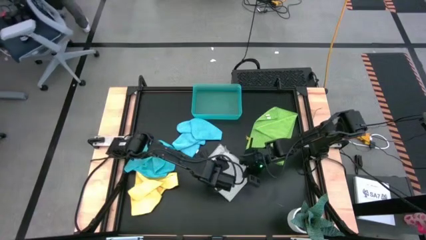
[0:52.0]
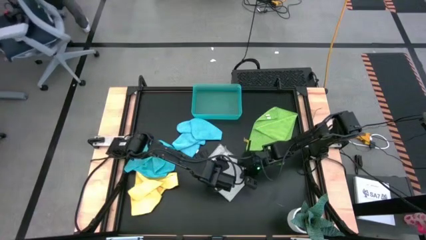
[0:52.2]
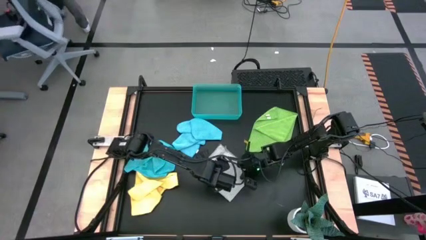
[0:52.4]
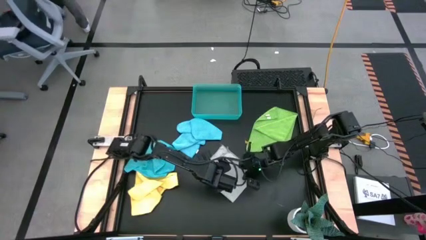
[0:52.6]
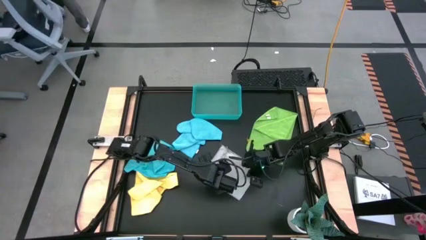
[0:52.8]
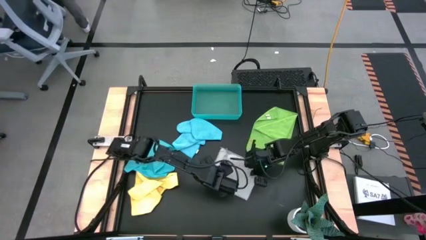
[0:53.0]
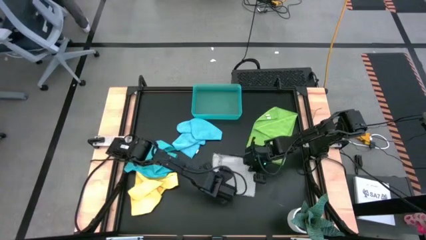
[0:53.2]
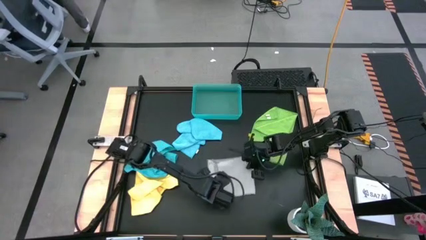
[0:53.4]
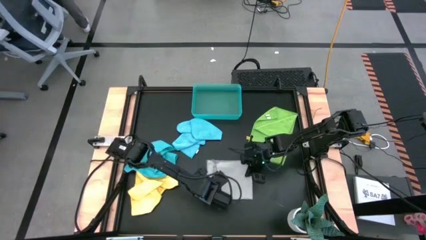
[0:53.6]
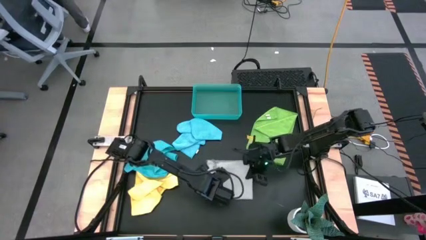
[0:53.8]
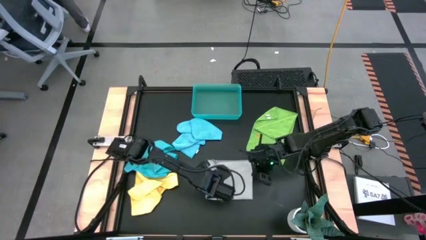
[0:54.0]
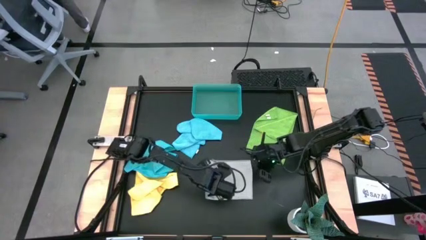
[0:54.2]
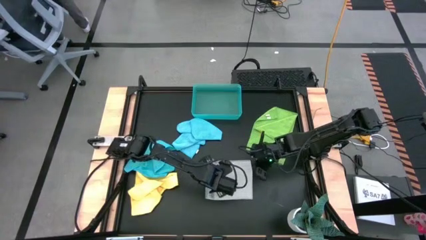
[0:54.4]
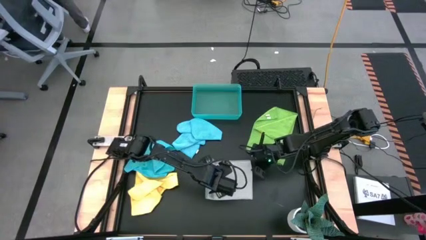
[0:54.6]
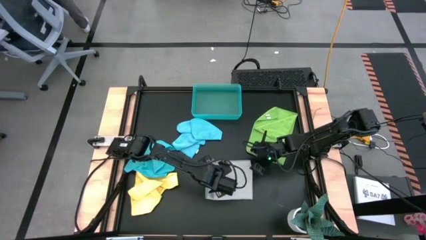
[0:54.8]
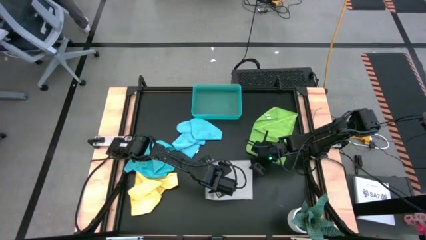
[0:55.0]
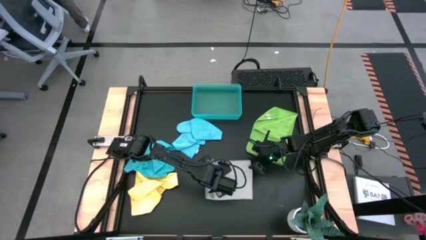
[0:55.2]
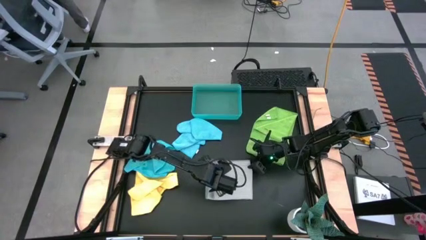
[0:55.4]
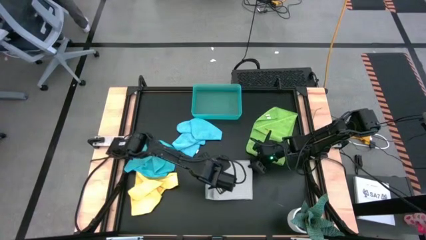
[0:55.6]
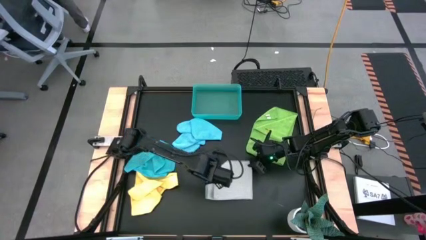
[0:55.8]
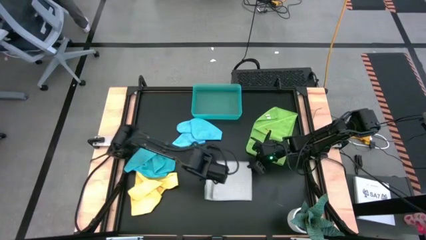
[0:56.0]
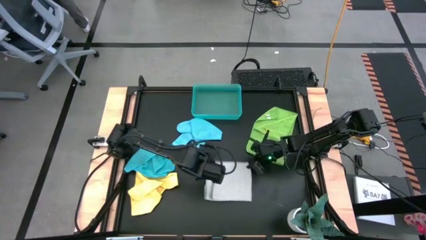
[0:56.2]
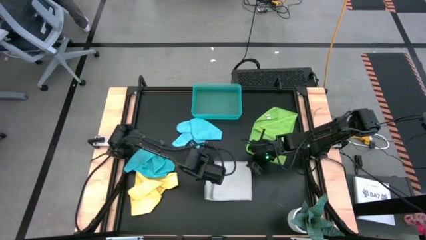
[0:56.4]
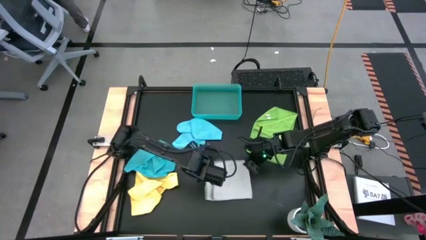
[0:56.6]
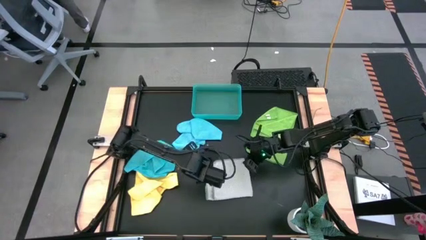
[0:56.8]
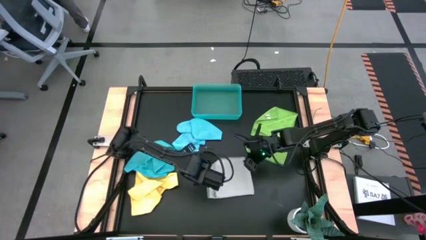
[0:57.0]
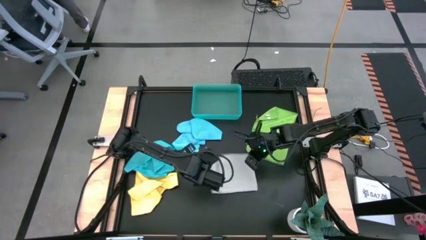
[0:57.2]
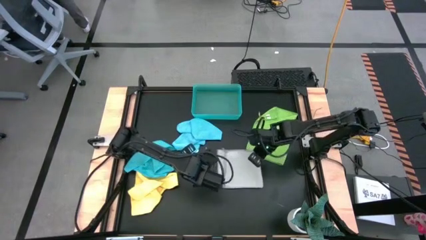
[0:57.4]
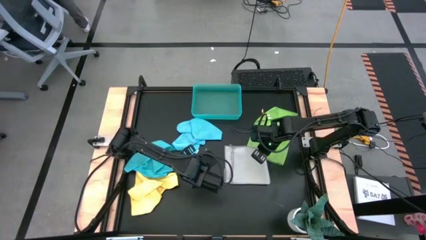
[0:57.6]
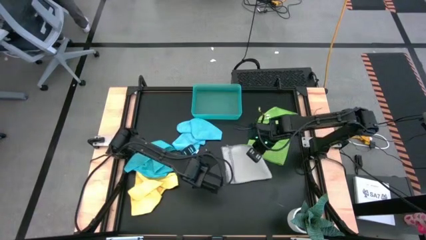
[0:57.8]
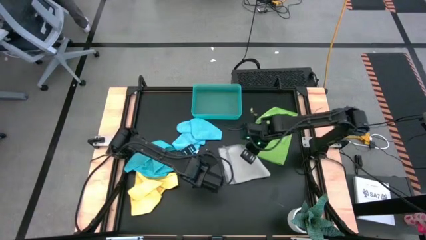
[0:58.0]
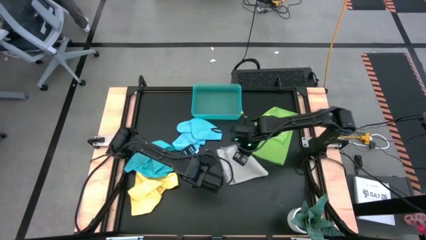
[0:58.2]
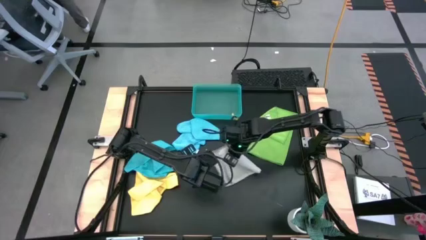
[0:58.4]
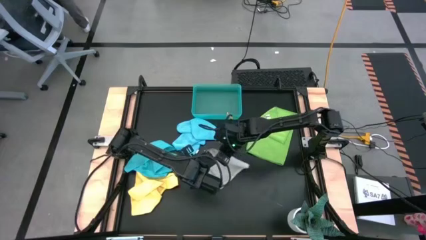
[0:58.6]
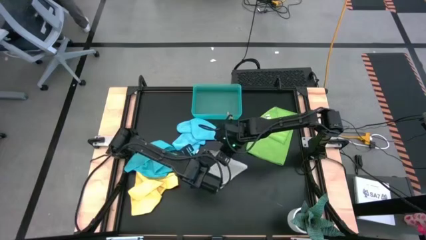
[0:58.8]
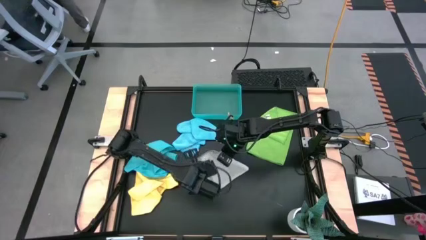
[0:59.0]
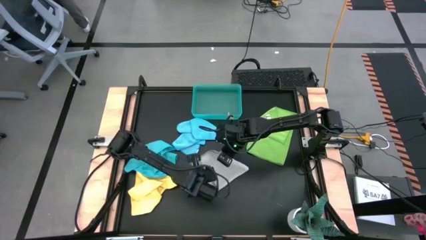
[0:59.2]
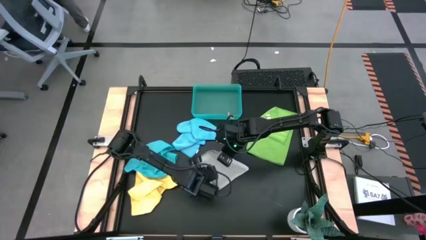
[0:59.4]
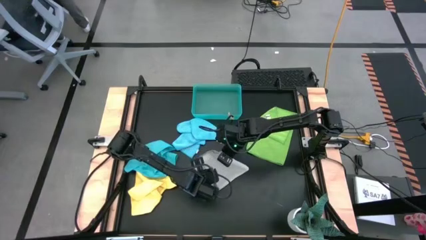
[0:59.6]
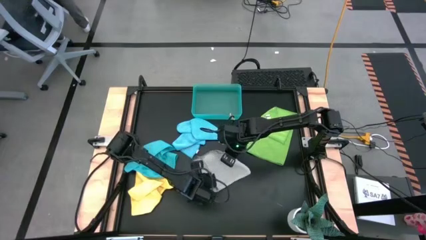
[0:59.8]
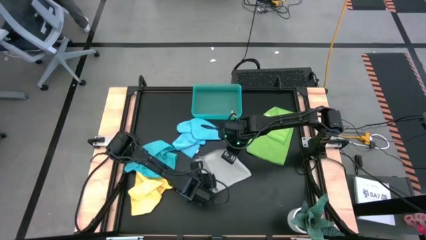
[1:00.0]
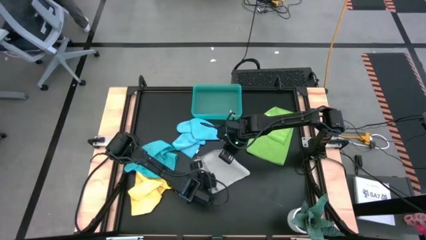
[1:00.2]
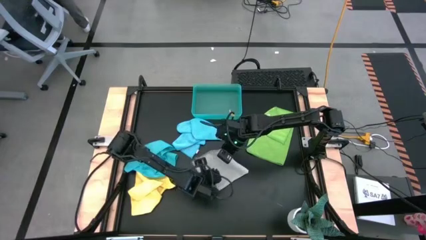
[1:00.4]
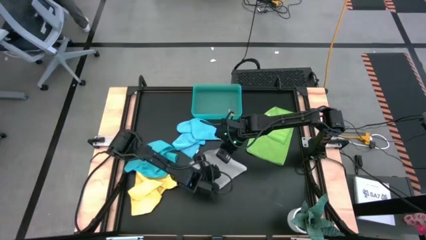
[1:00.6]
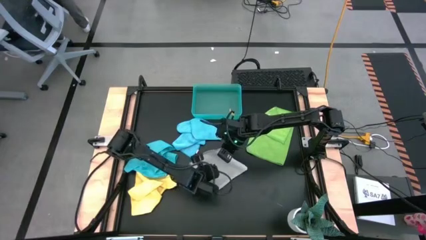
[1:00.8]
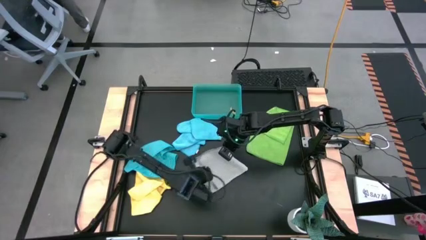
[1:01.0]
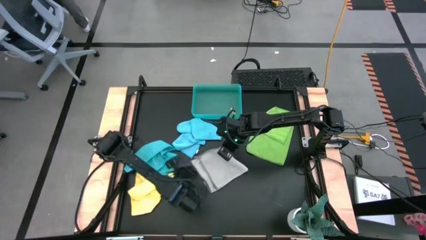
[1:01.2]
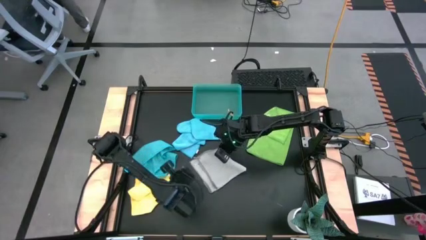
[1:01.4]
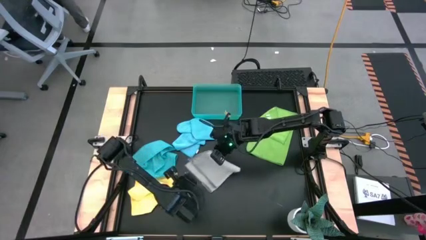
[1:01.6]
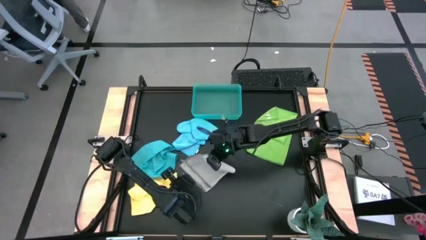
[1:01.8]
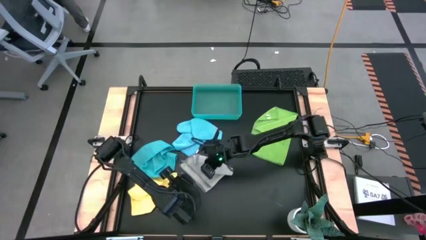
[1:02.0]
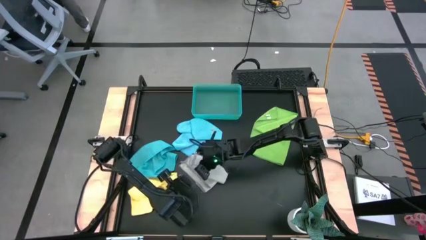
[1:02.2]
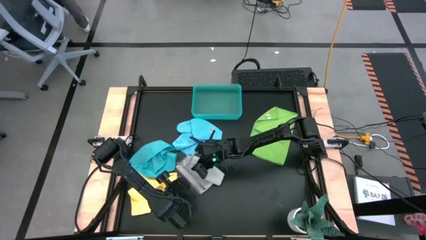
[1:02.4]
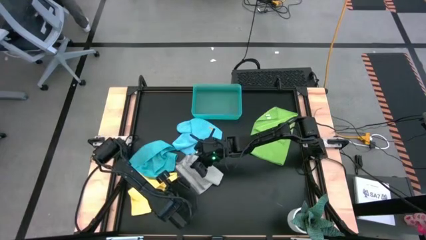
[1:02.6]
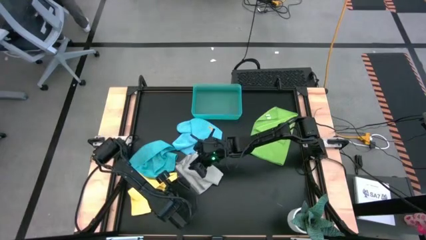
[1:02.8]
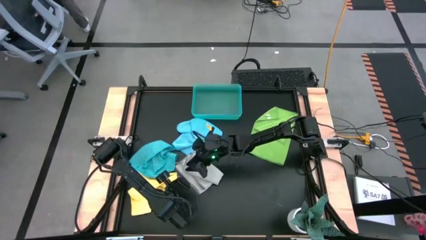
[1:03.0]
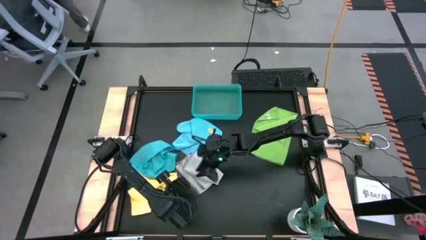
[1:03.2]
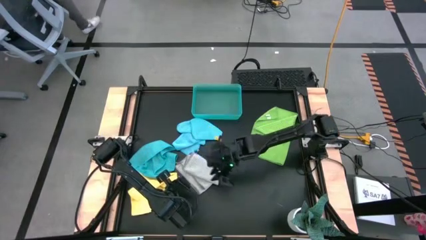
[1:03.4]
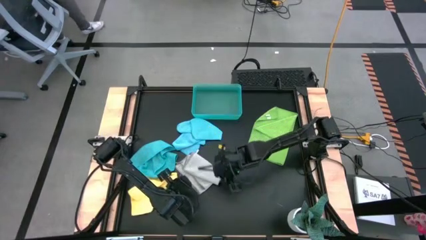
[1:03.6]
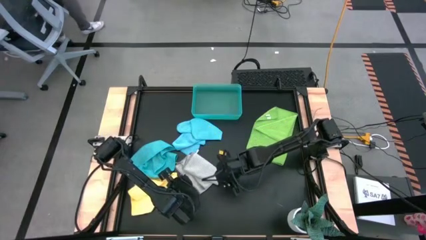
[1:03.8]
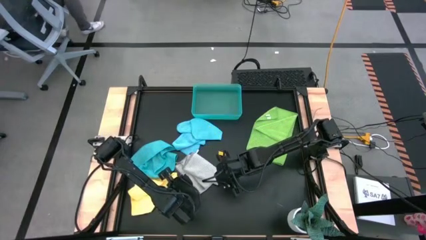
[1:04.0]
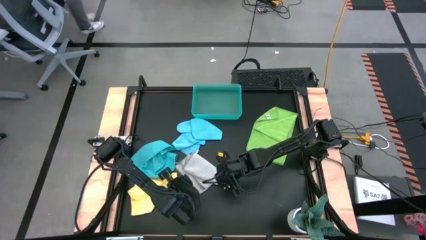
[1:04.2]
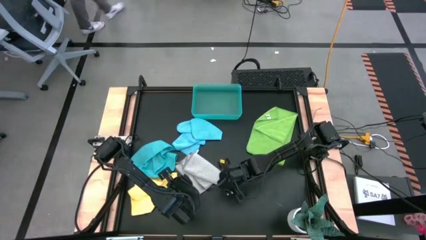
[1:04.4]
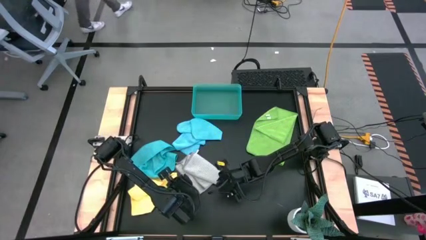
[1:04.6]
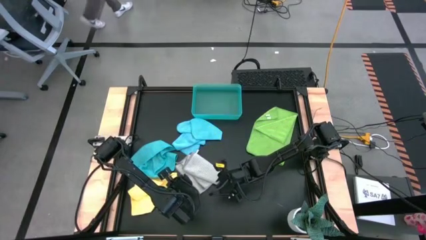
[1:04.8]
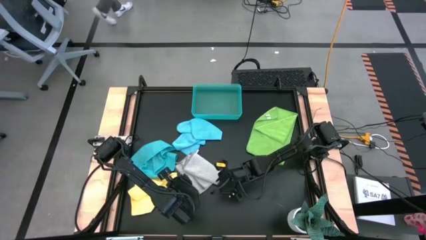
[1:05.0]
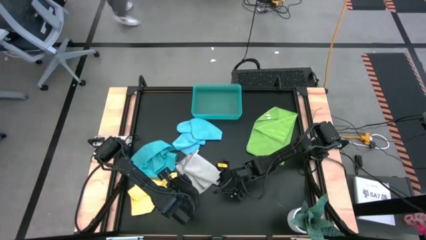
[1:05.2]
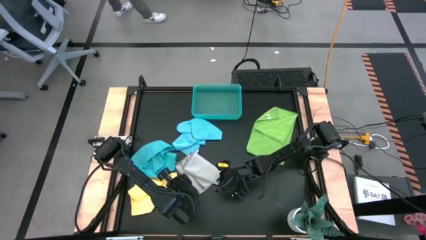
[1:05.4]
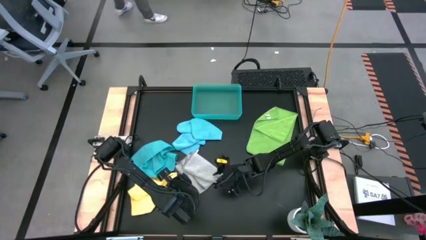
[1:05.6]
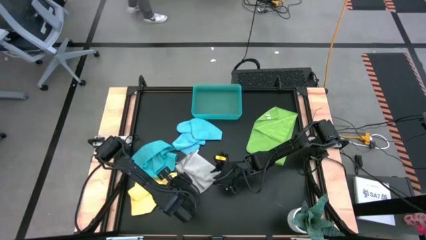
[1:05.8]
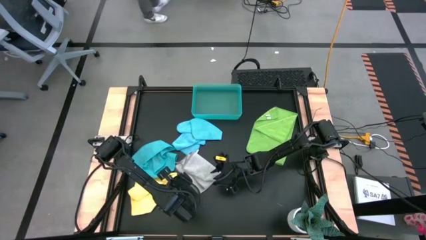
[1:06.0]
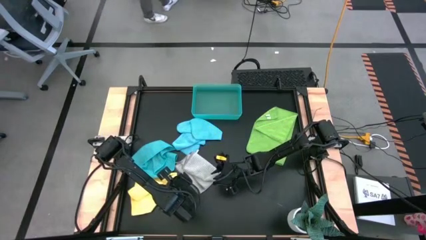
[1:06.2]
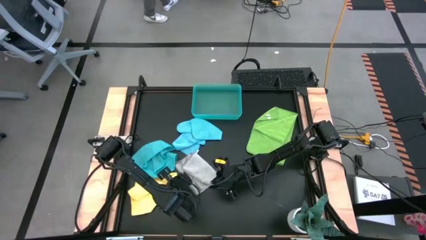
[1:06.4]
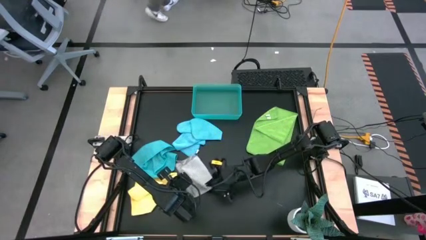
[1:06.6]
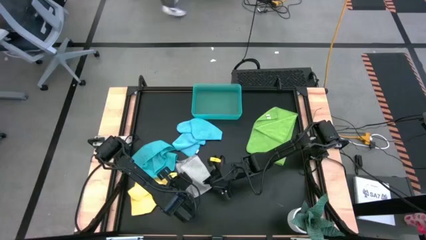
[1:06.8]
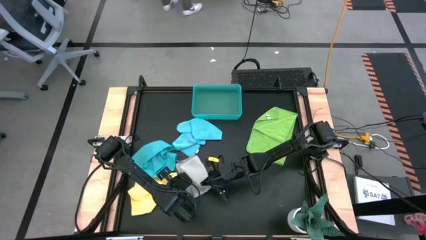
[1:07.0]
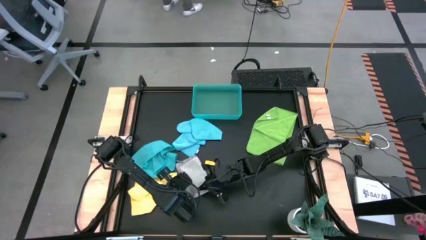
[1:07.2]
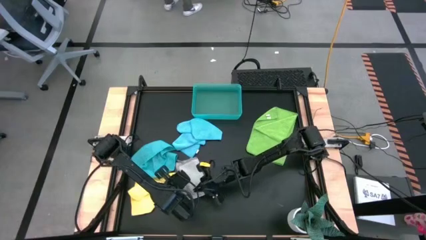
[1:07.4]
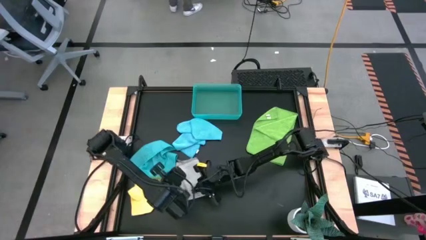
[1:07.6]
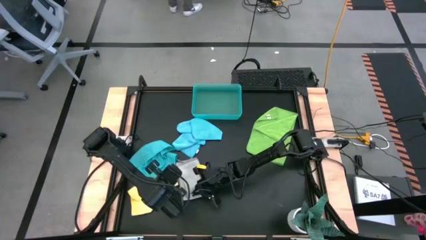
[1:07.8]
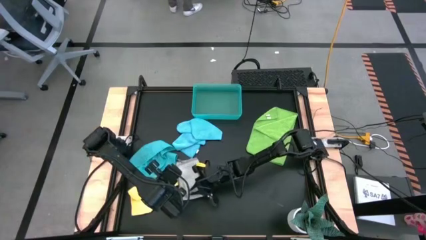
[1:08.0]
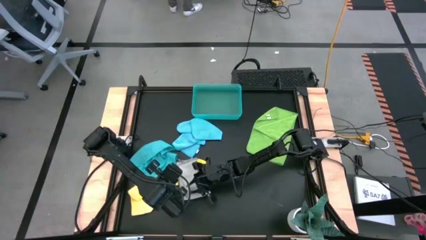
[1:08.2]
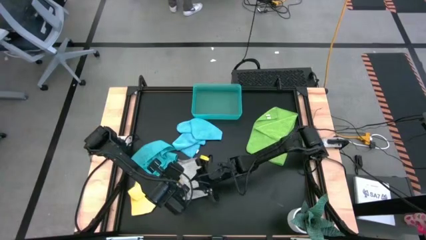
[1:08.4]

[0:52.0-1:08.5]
Task: Fold microfiber towels
Fold the gray microfiber towel
